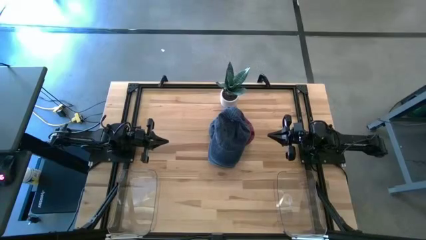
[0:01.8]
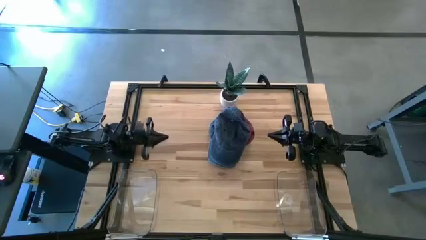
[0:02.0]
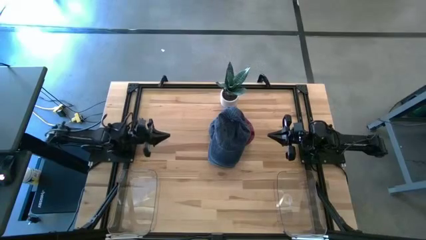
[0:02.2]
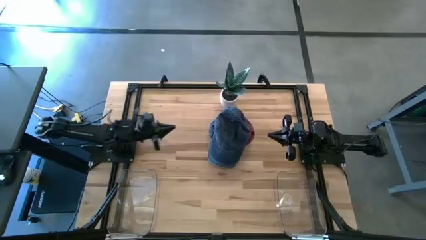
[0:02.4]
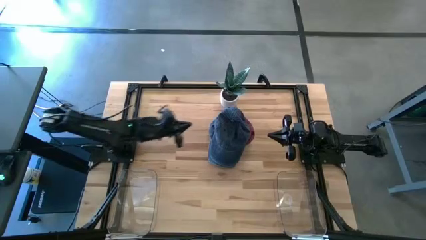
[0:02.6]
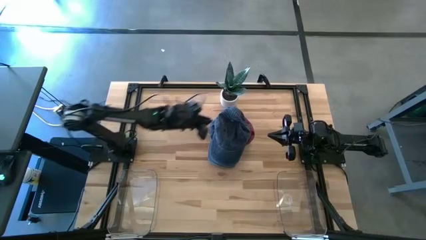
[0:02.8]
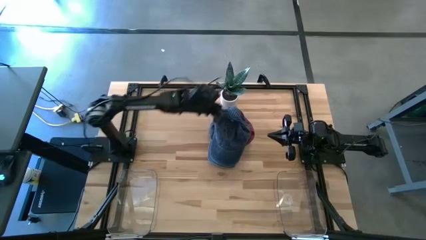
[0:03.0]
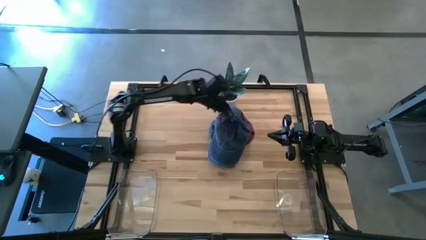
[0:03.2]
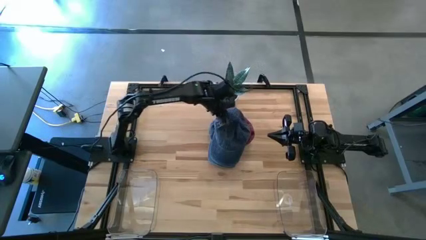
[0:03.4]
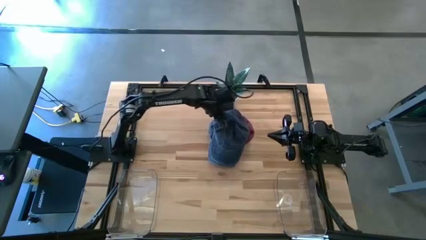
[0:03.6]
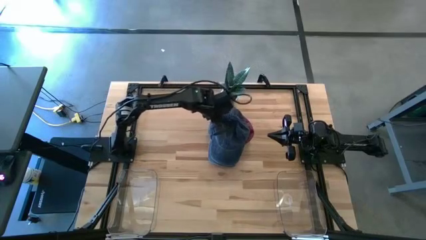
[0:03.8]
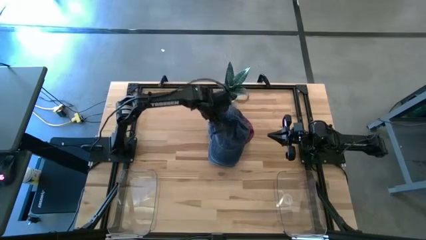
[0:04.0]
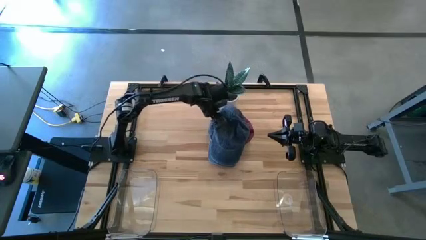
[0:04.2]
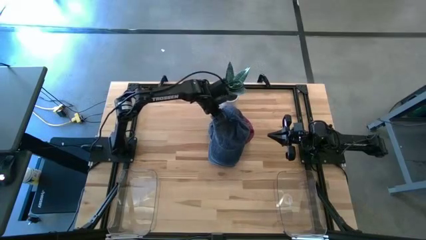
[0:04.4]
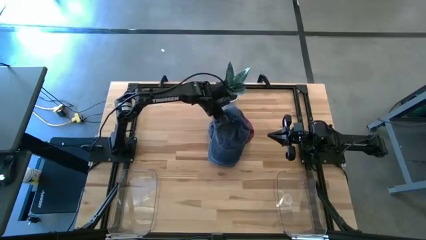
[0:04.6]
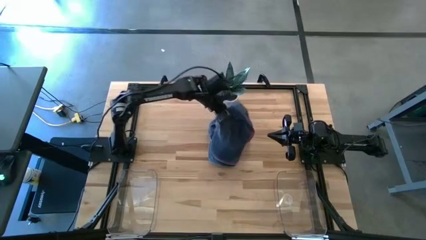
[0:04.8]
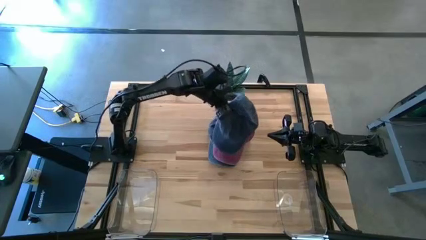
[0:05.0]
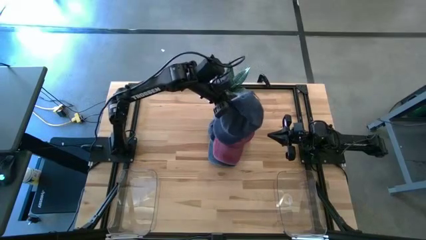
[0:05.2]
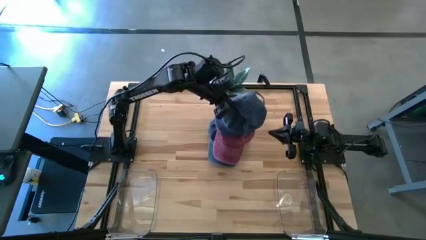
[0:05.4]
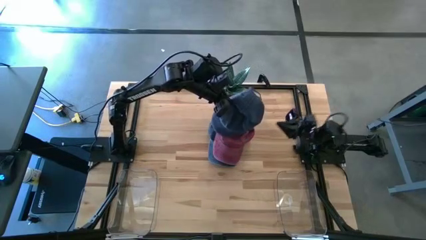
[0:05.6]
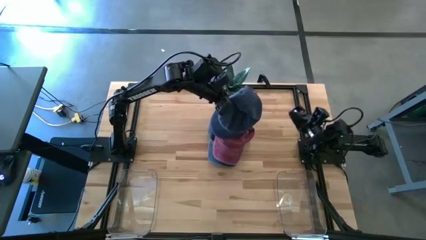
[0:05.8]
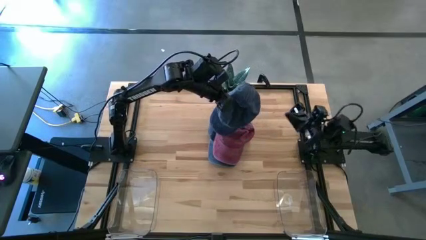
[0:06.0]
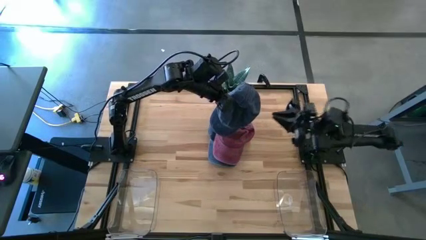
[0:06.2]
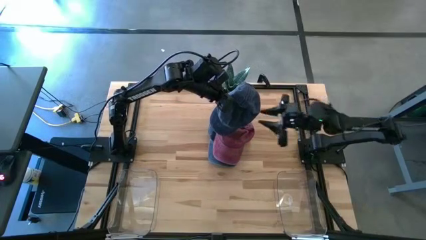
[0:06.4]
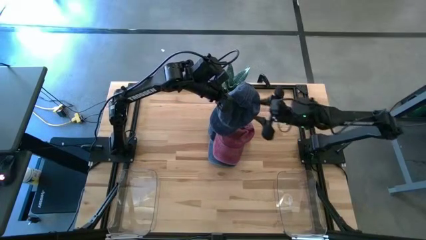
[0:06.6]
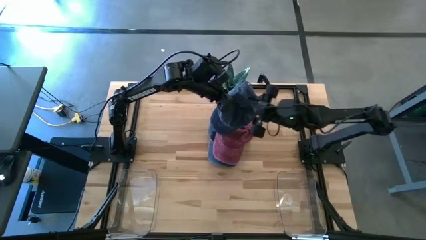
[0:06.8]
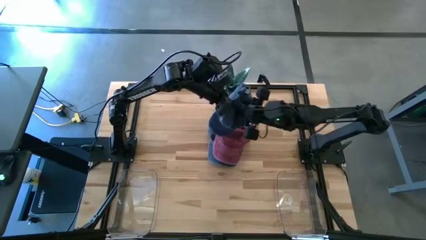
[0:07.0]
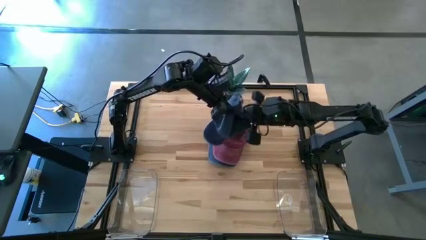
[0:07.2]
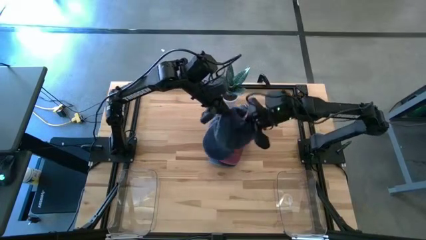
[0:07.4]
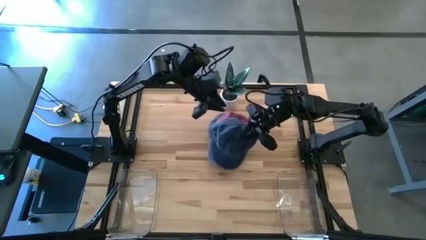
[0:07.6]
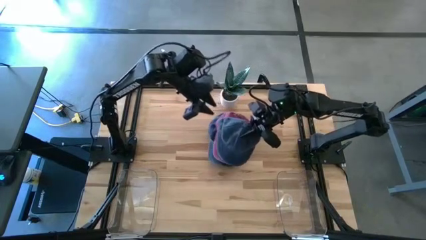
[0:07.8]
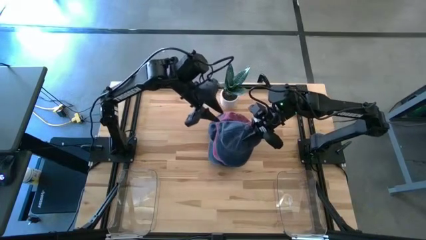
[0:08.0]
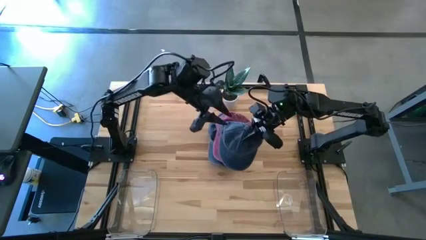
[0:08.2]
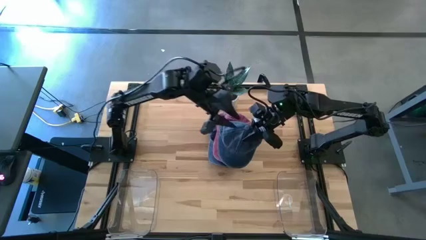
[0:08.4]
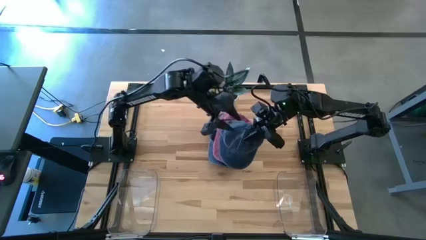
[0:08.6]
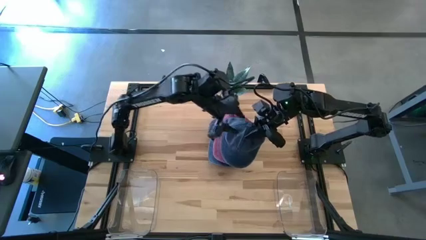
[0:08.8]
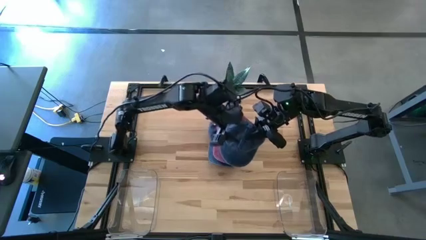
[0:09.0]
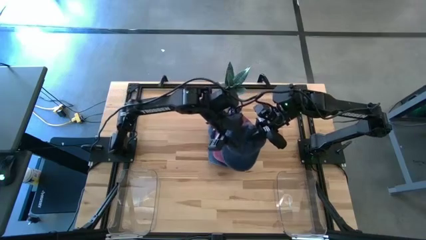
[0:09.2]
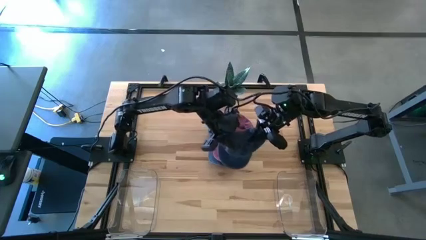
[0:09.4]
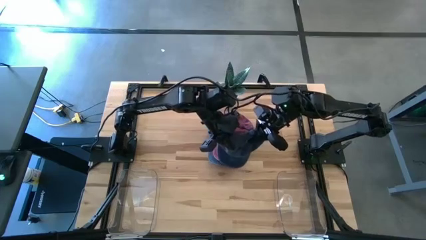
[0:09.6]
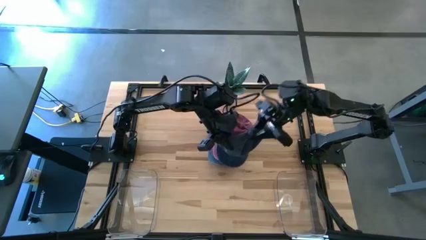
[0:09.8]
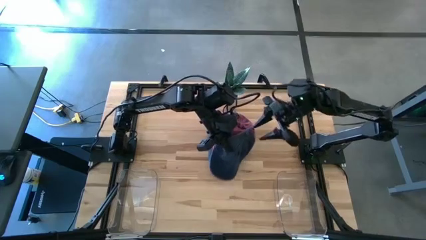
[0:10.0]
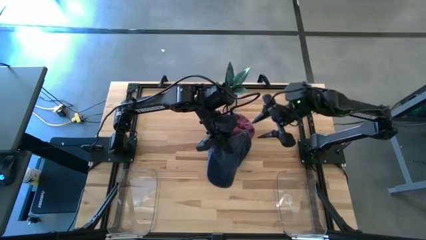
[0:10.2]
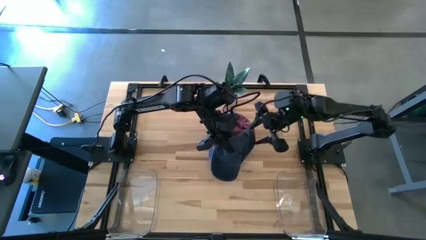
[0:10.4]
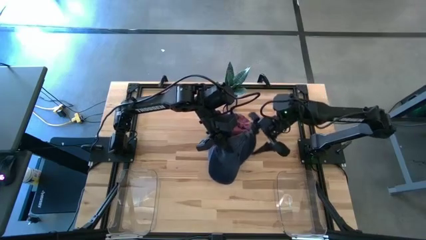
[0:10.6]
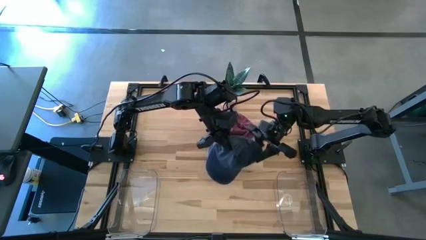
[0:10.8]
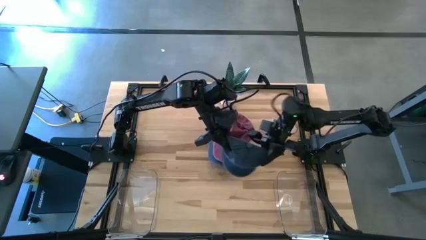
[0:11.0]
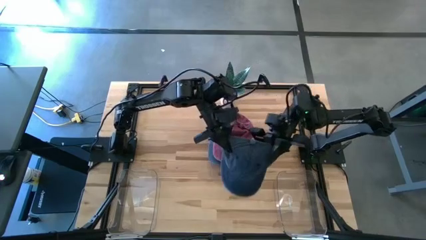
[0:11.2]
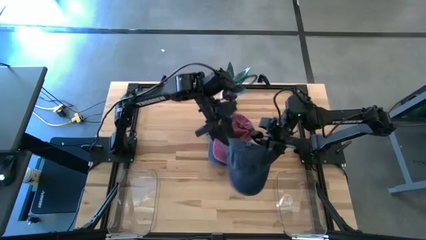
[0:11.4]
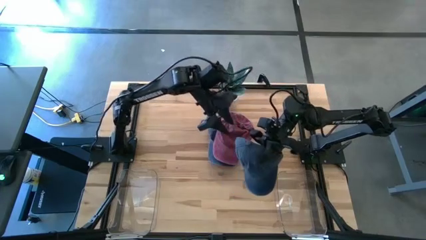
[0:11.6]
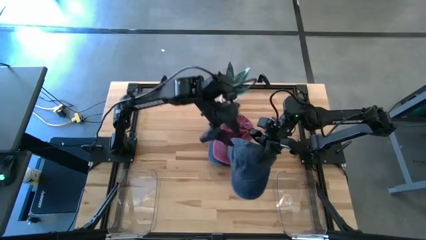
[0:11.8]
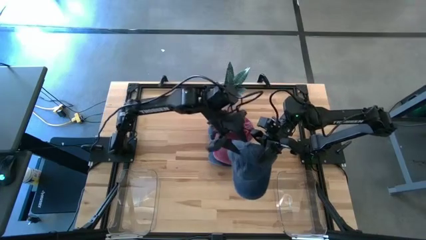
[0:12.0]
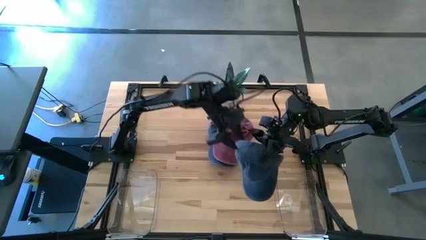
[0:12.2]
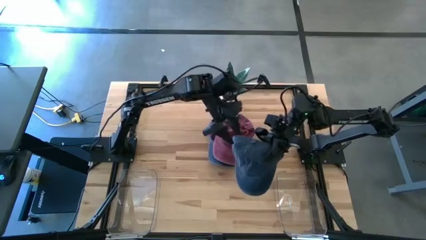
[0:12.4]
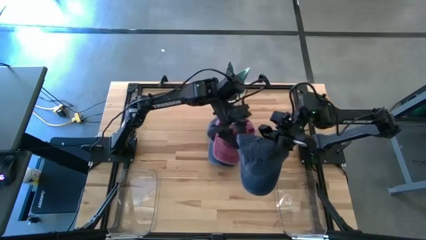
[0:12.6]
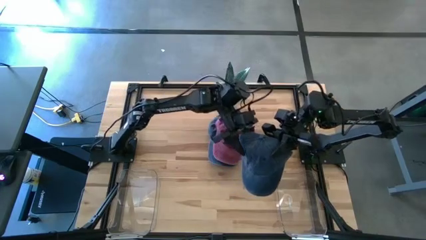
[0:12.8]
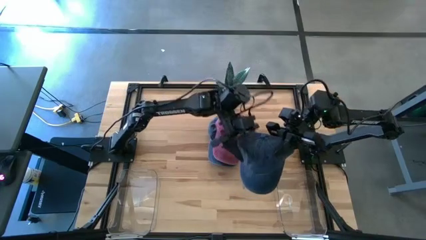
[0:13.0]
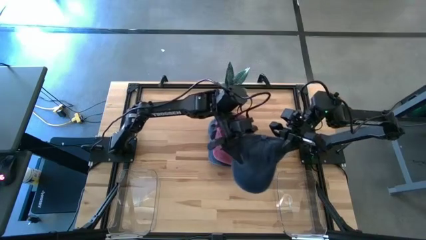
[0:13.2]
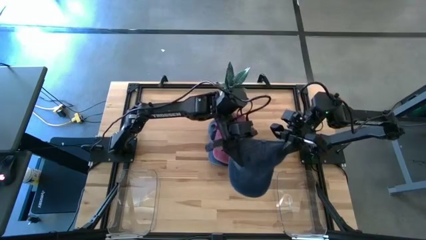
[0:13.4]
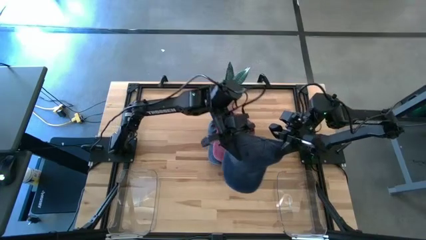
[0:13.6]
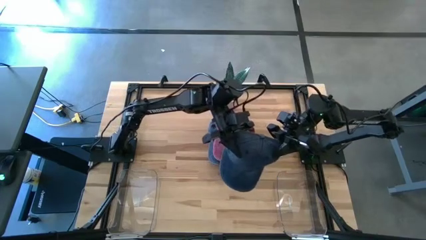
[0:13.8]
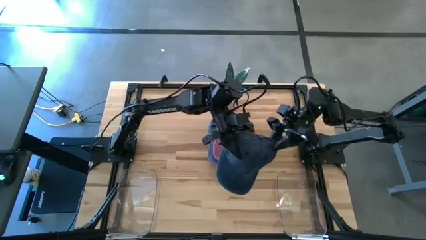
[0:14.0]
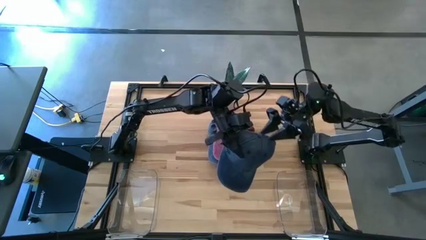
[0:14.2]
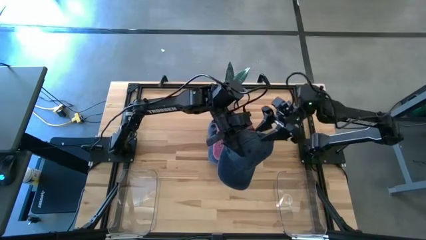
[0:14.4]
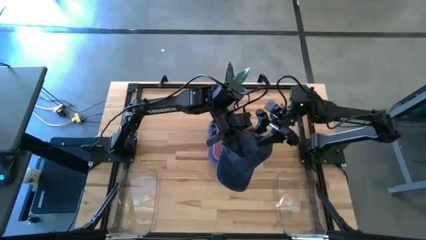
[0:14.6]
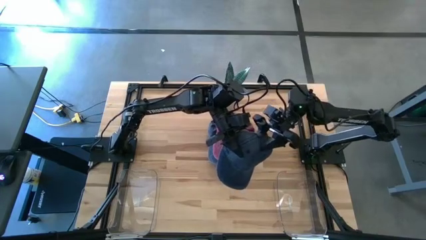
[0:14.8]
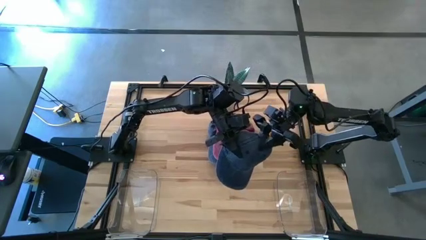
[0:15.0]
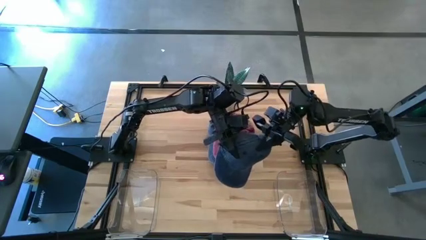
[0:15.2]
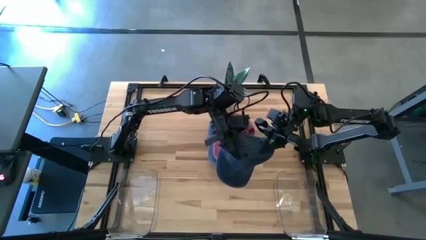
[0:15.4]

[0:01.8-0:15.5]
Task: Pick & Place hat
Put the blue cap into the right transparent bin
